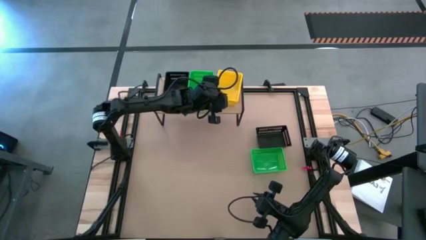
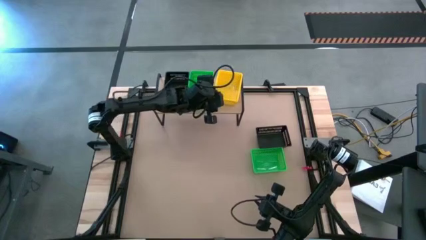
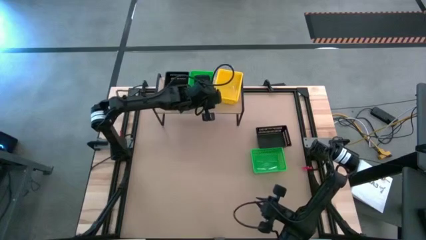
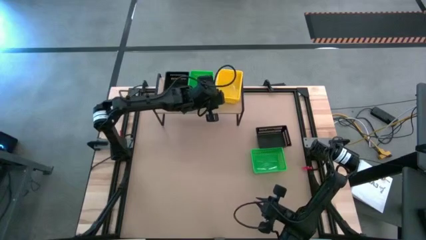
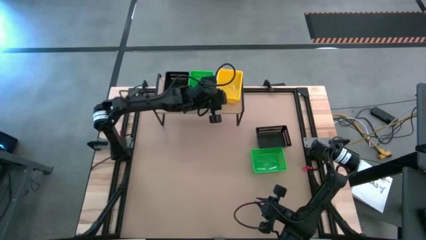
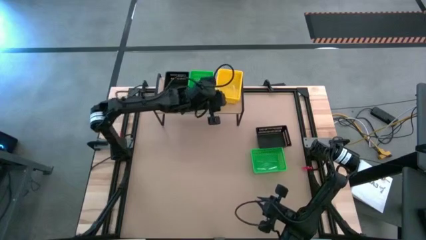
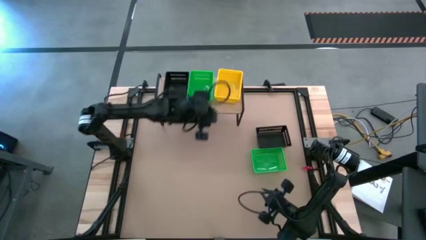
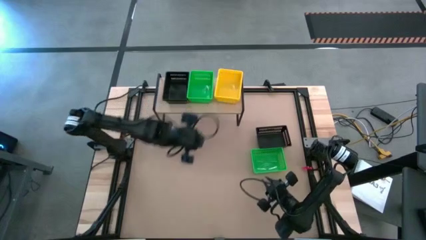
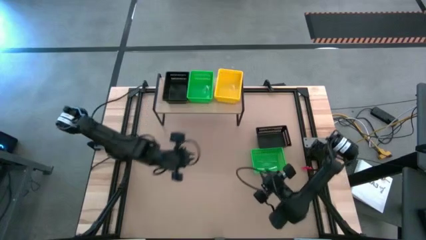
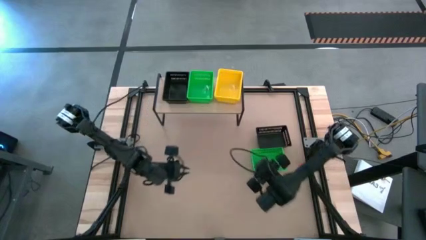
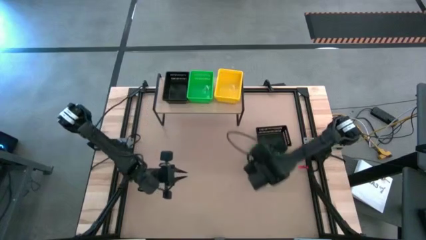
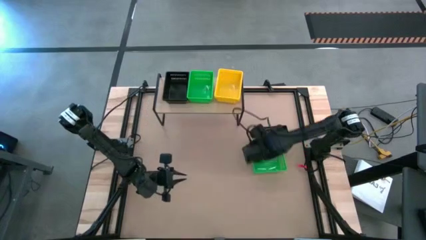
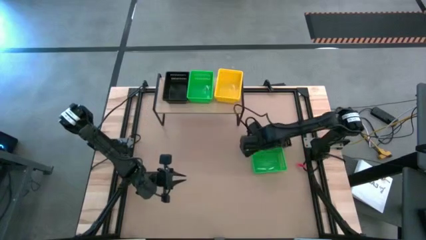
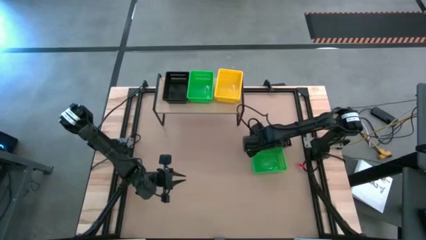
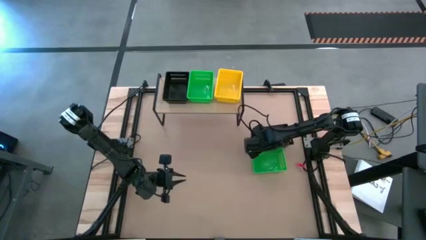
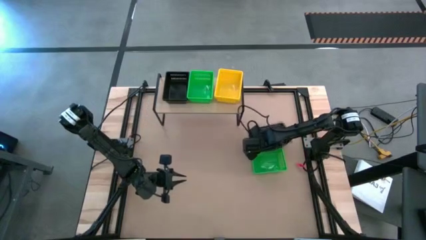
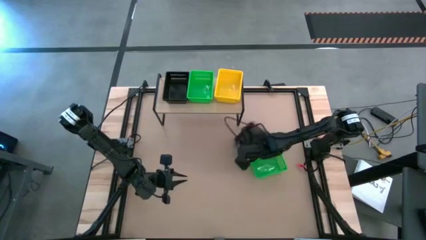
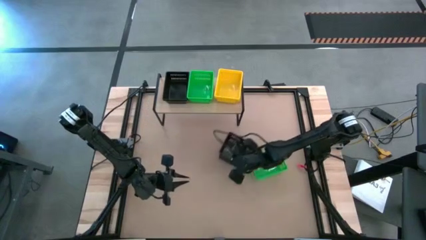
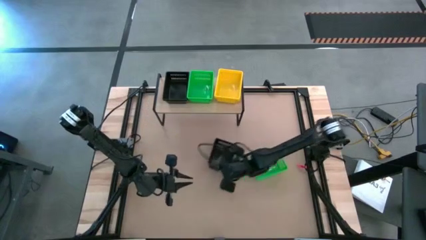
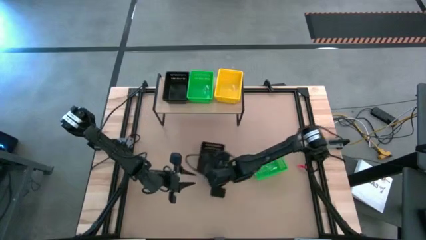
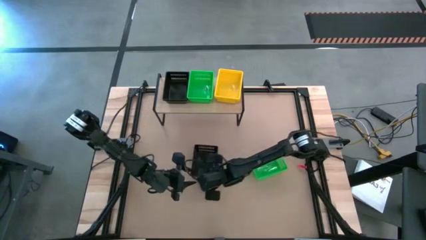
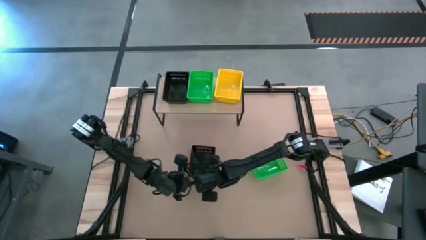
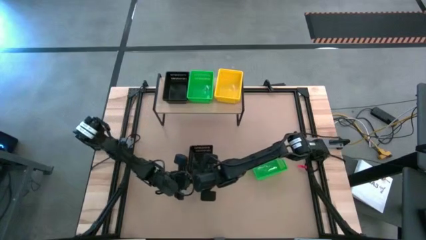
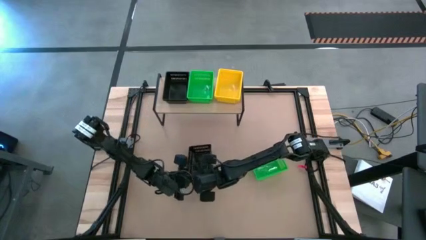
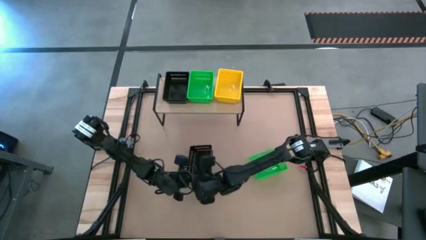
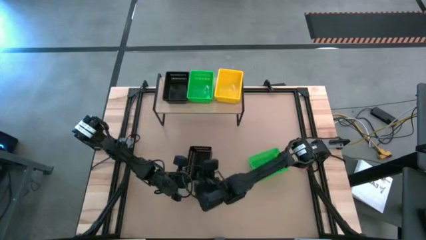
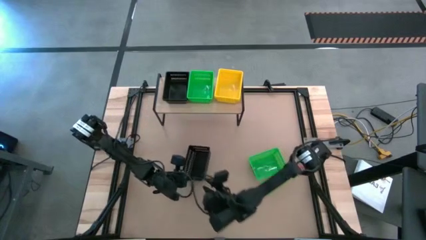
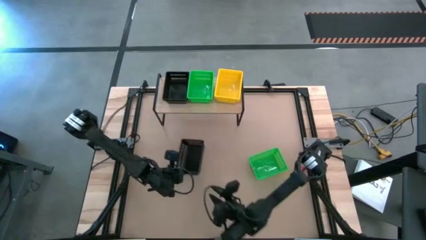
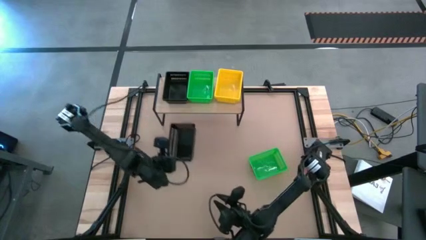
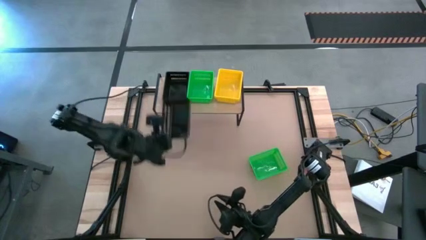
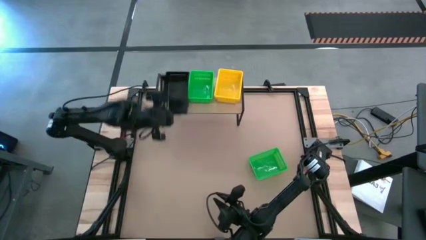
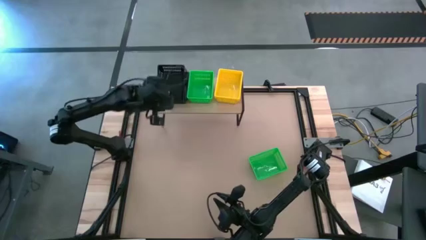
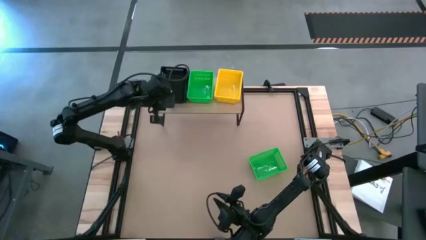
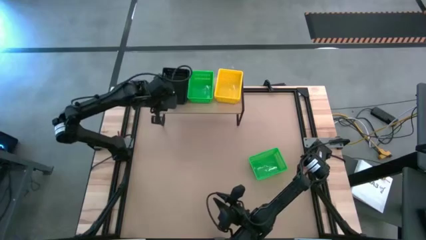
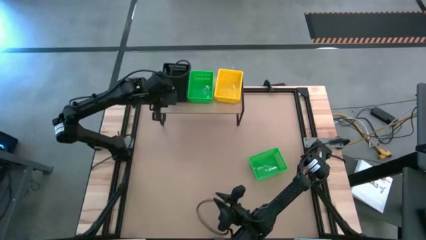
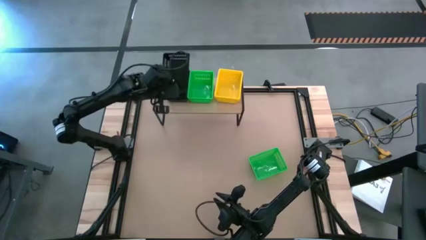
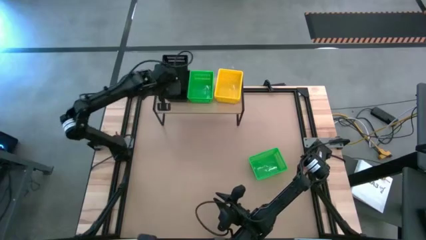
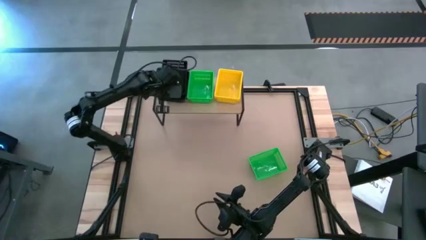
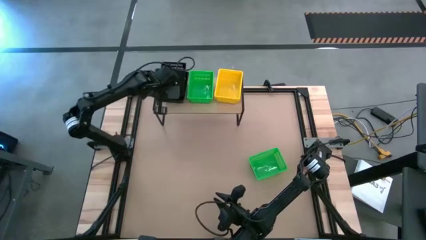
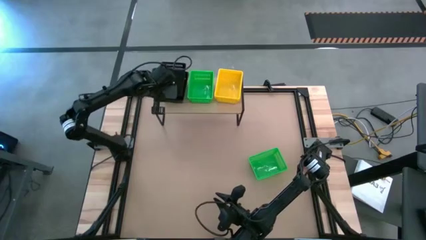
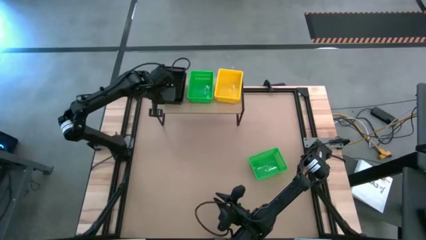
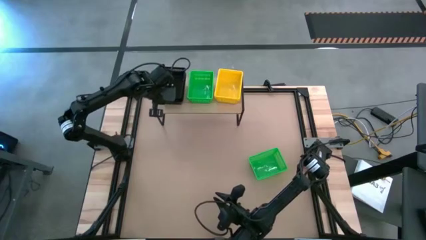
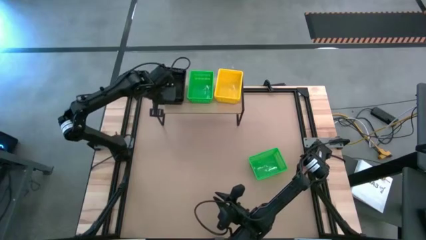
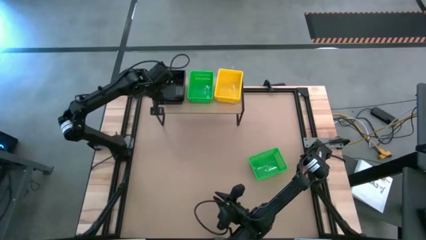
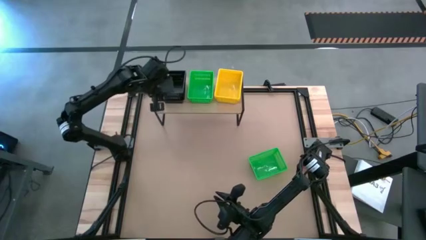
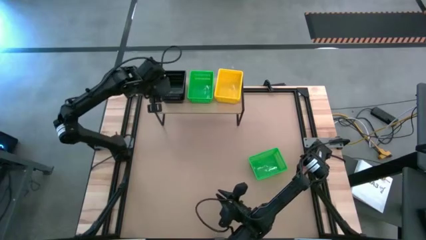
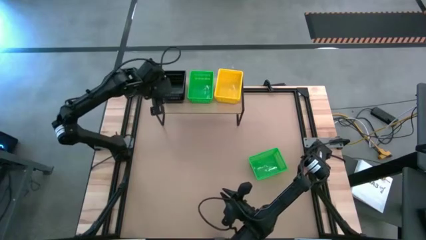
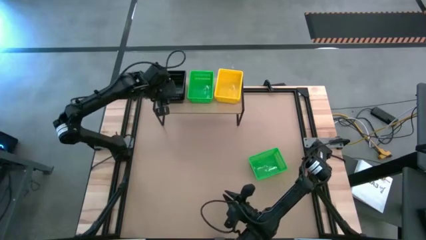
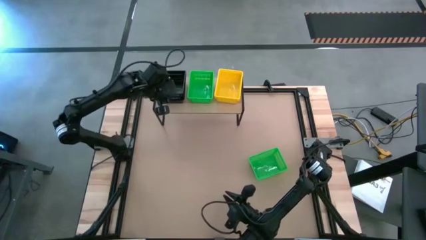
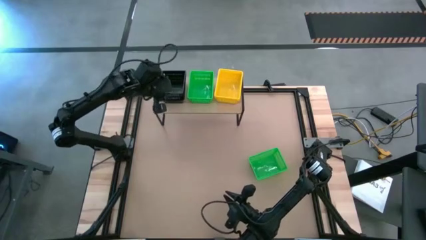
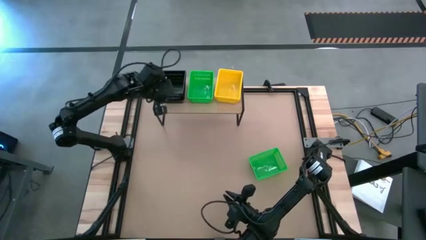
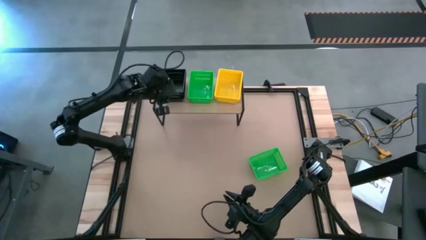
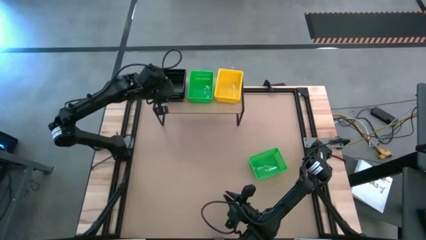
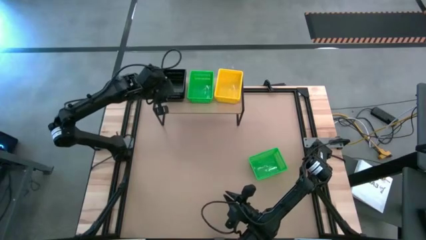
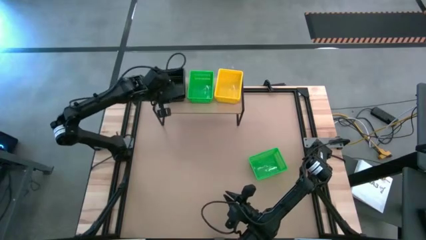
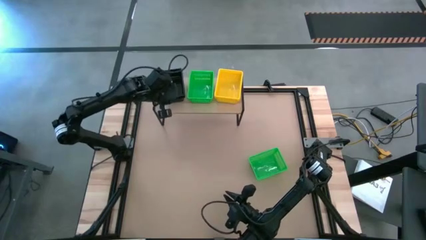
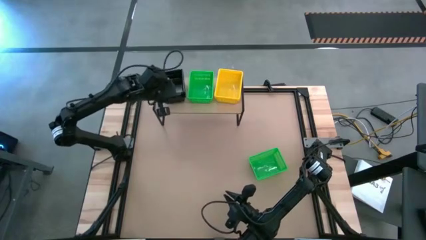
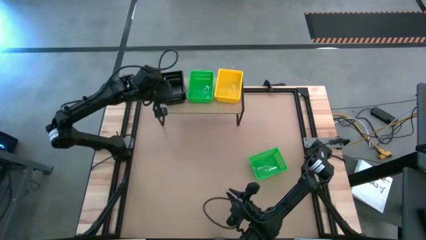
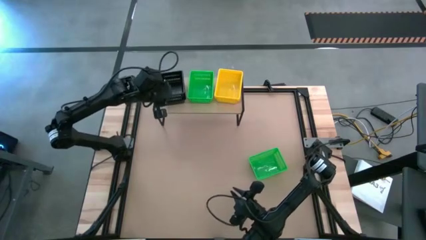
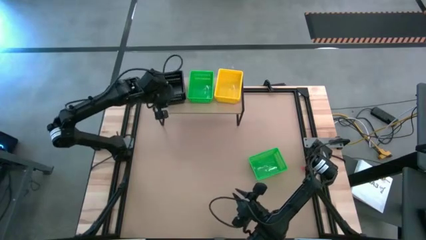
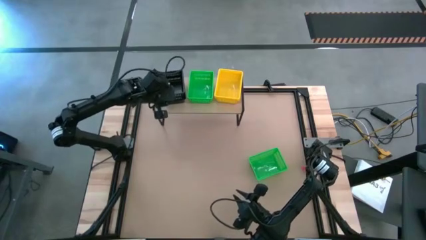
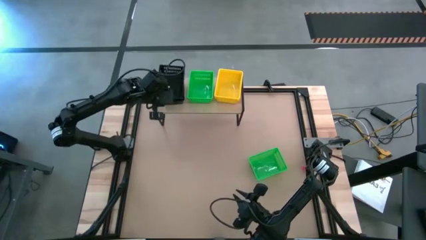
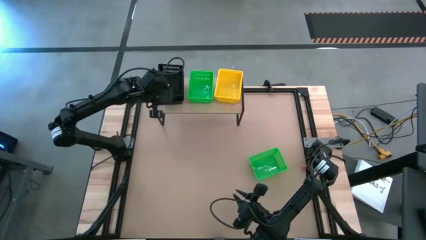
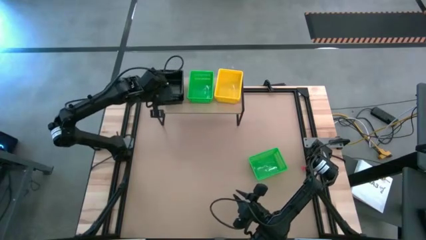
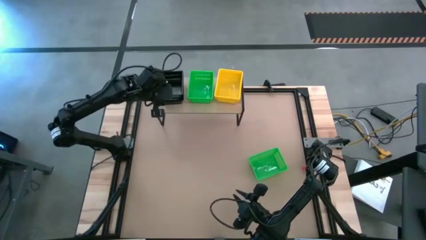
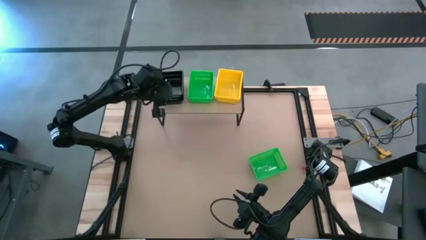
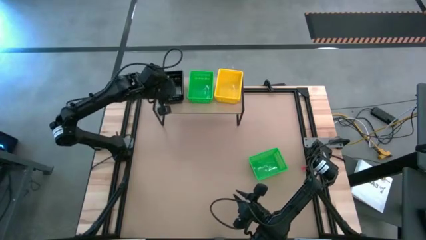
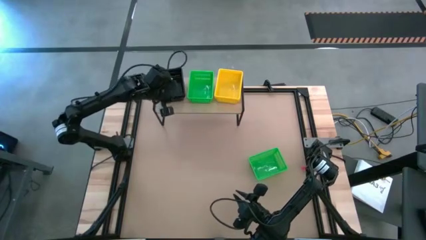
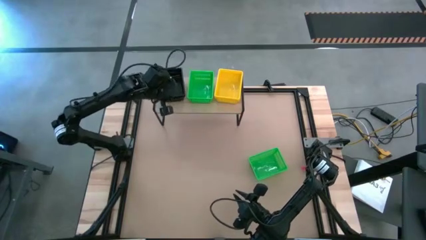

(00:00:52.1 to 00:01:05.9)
Task: Stack baskets on shelf by color
Stack the black bin on top of the black bin on the shelf

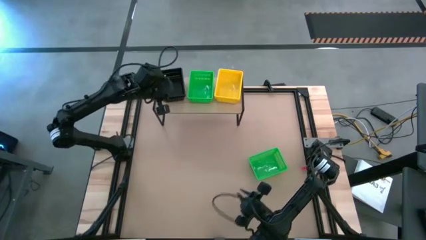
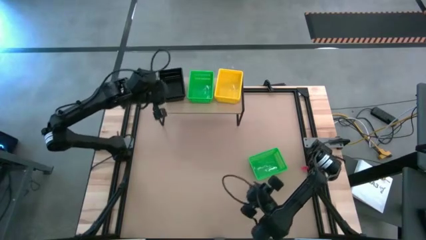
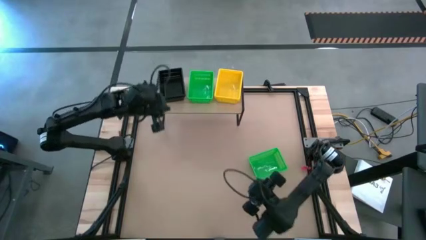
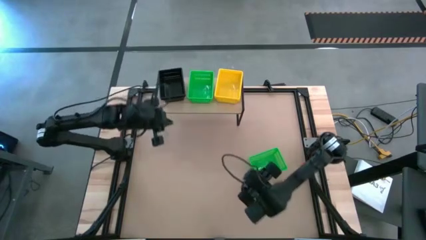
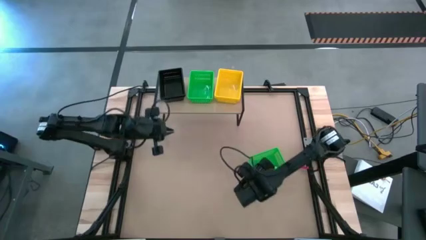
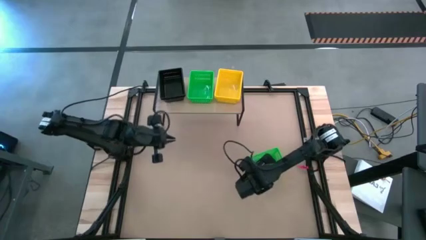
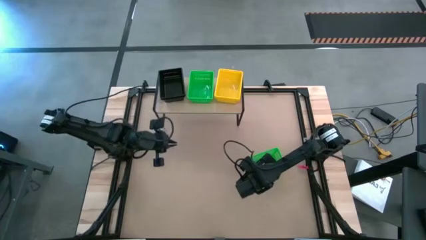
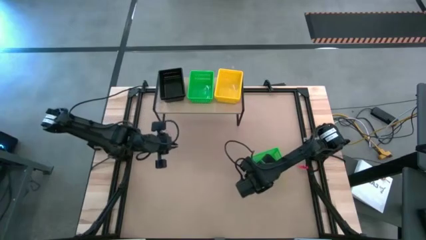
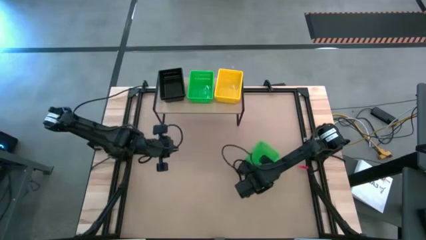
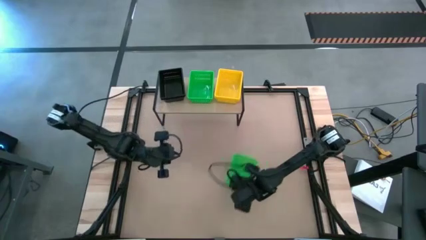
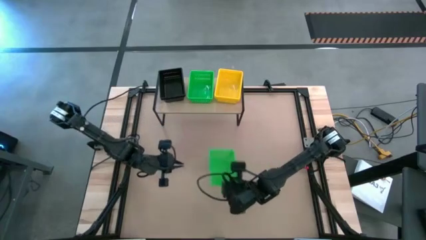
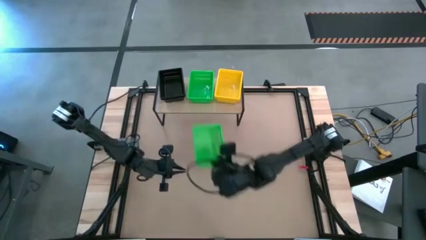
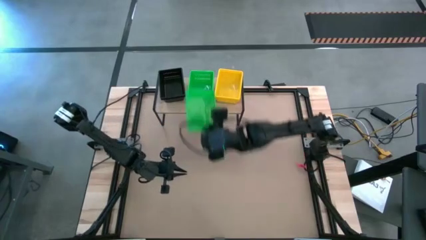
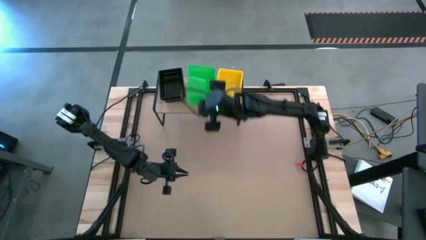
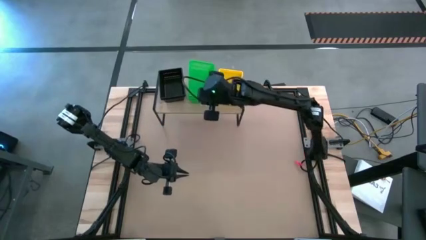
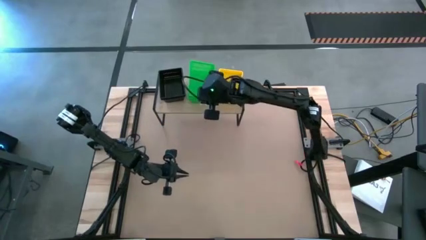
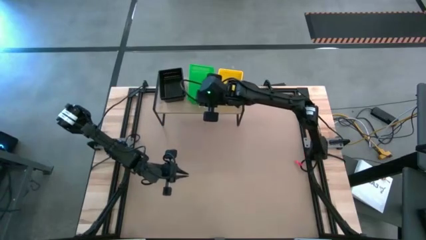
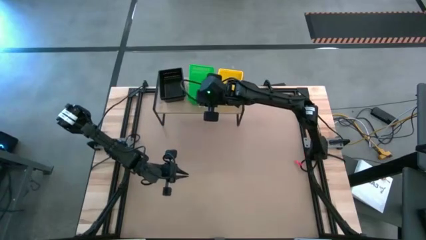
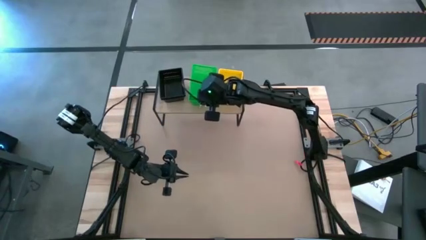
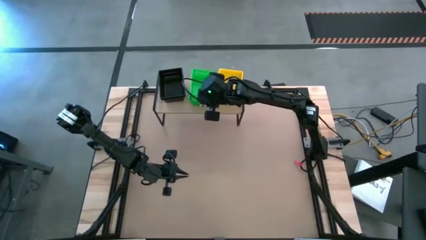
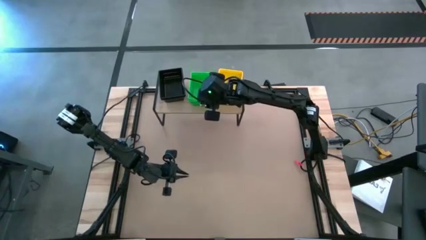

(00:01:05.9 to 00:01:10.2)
Stack the green bin on top of the green bin on the shelf
